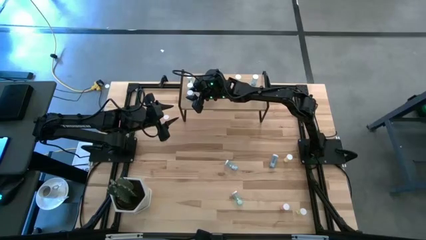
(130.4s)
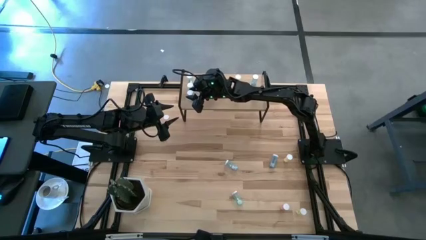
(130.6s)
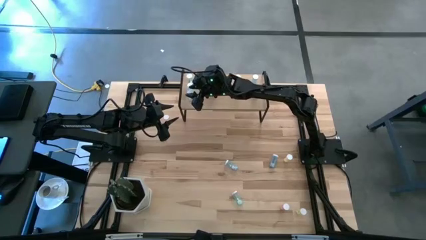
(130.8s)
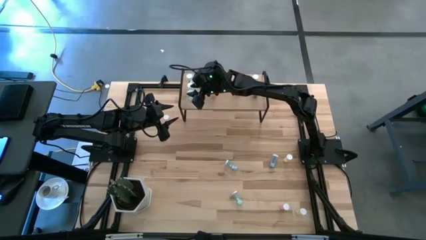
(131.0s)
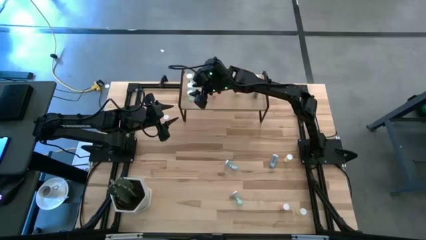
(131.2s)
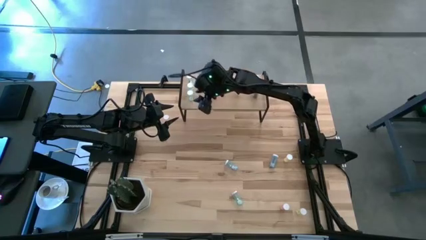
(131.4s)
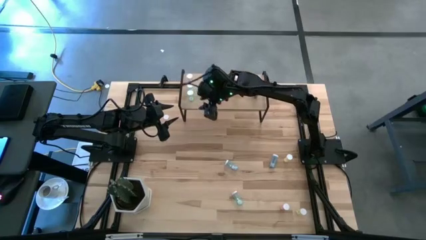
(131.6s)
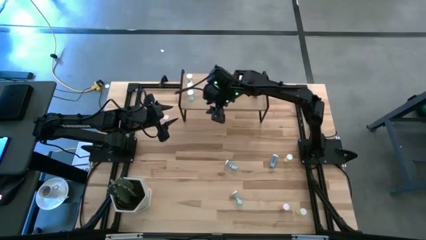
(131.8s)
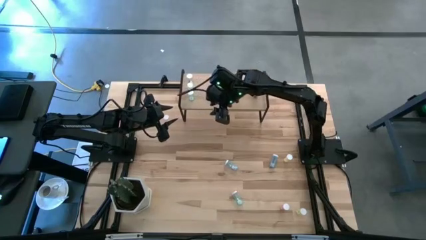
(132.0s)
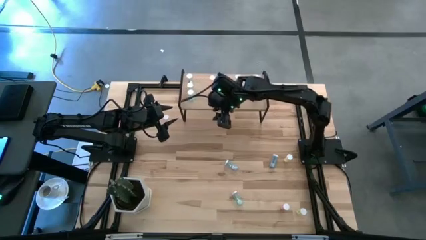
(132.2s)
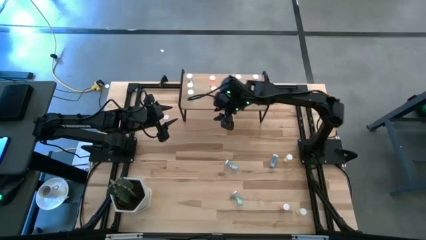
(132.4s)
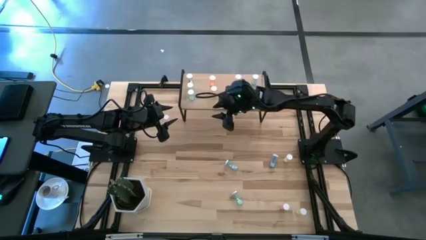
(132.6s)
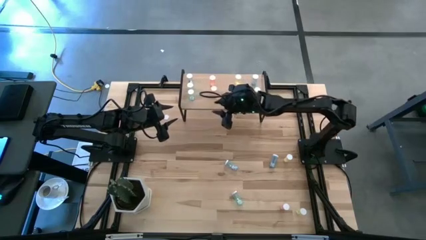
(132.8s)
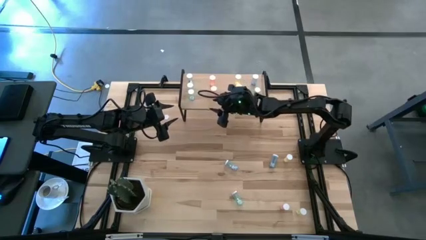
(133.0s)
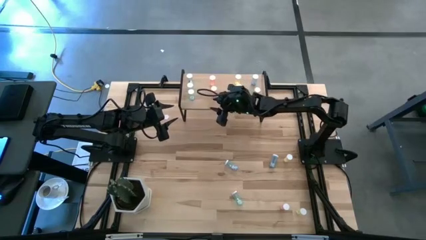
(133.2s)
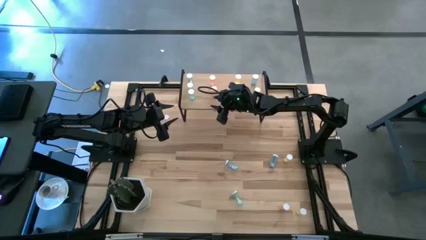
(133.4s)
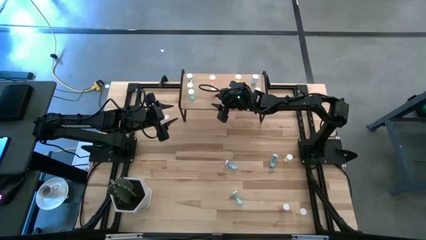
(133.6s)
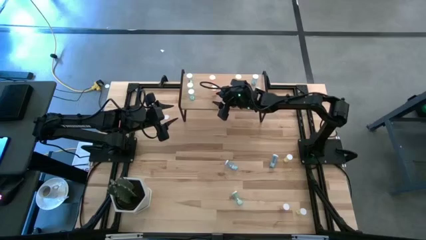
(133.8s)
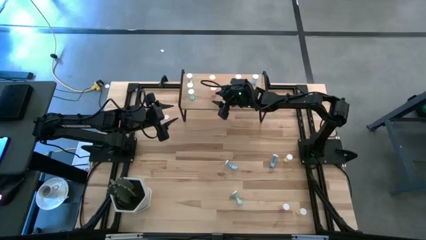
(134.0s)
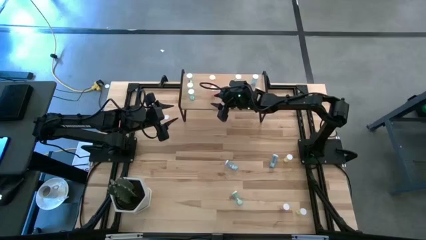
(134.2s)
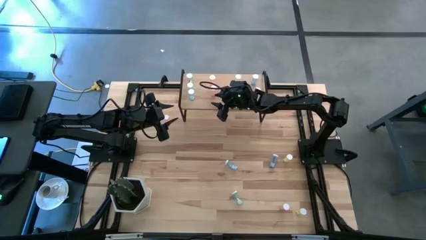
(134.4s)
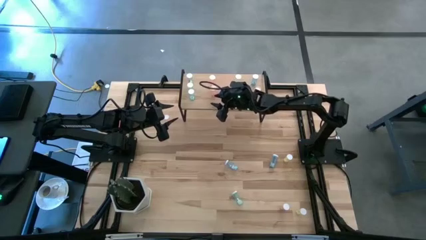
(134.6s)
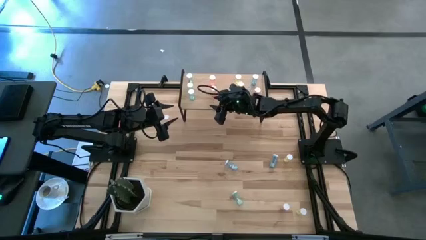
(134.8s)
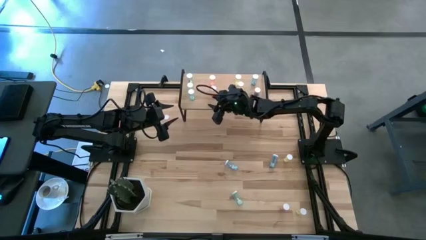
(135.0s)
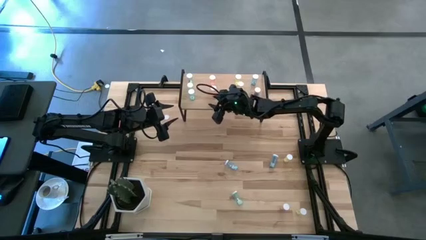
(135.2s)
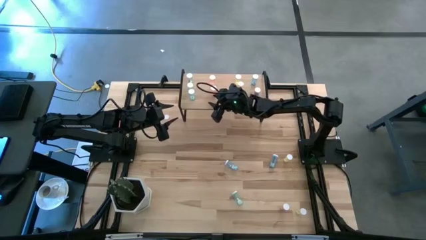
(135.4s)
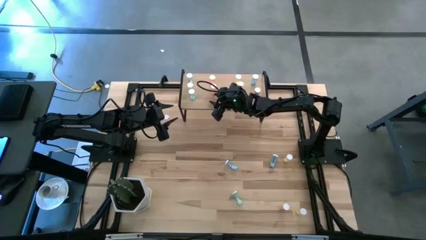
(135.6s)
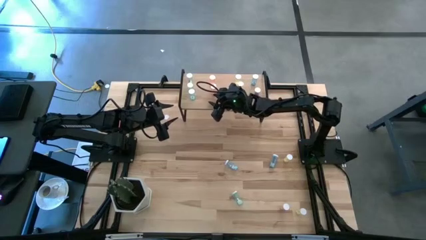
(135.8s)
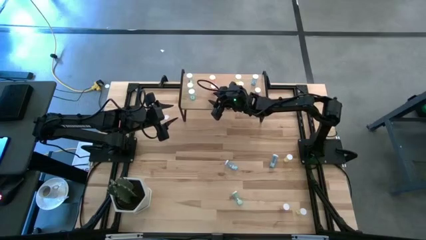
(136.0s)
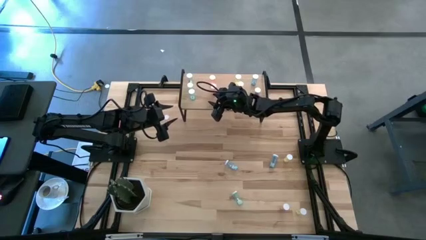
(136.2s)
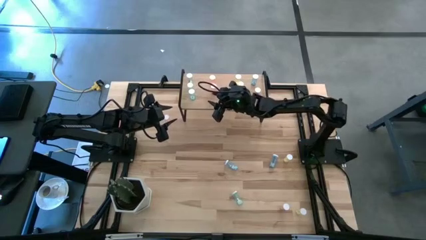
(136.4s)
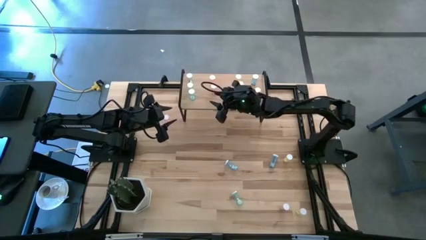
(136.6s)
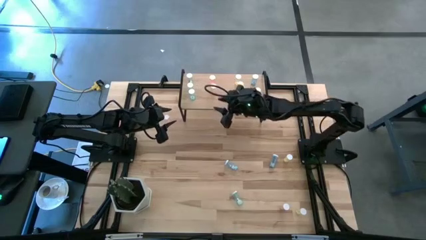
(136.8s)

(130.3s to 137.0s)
Task: Pick and place medicine bottles onto shelf by color
Adjust the pink pill bottle on the shelf

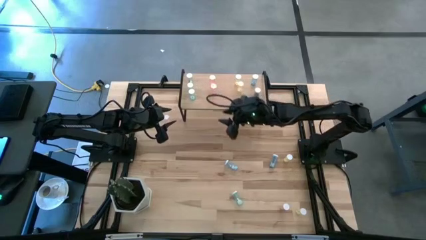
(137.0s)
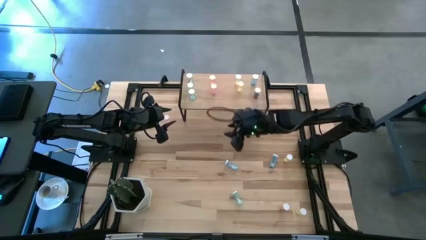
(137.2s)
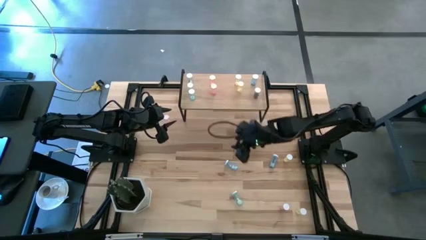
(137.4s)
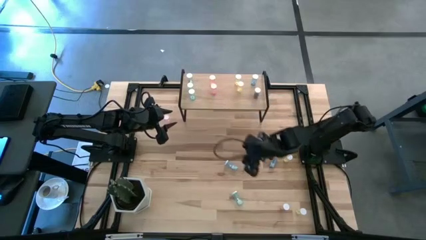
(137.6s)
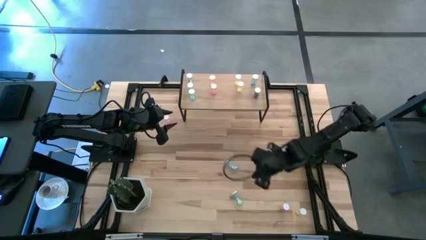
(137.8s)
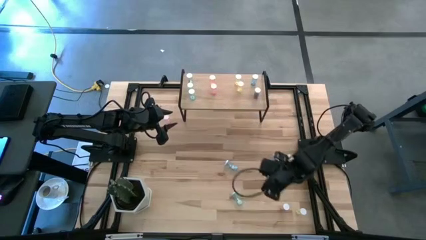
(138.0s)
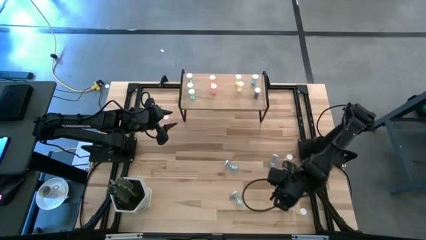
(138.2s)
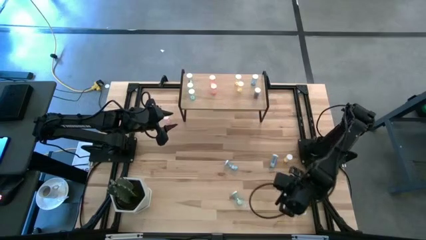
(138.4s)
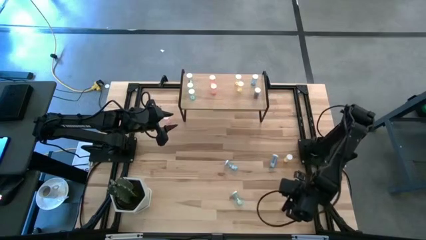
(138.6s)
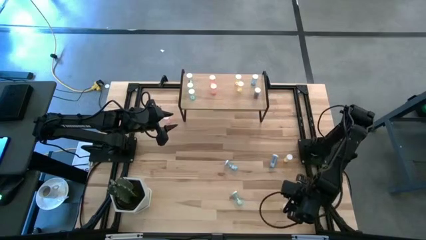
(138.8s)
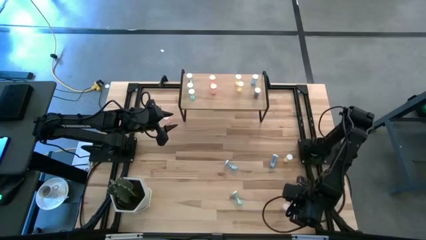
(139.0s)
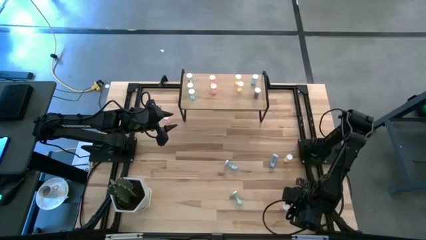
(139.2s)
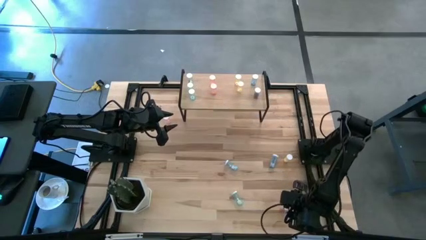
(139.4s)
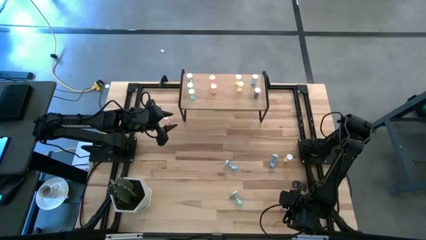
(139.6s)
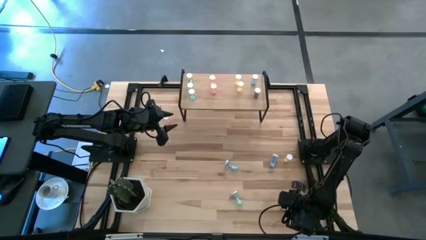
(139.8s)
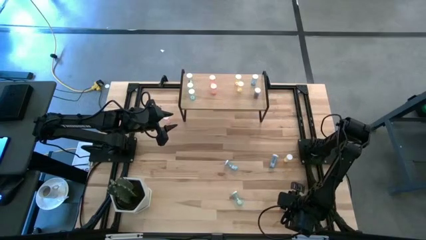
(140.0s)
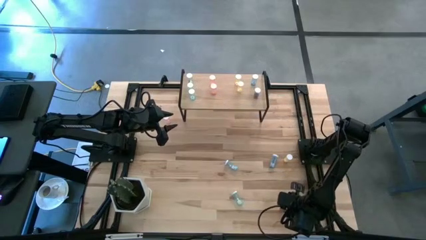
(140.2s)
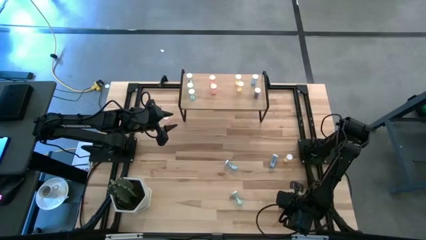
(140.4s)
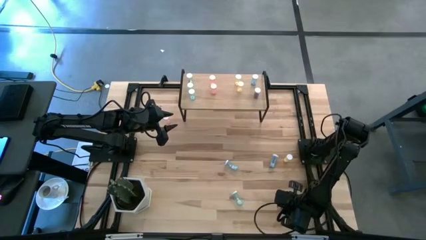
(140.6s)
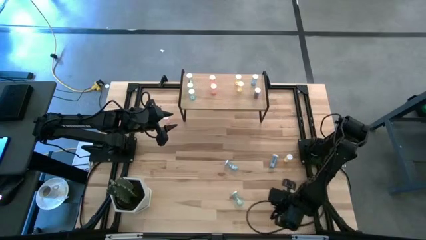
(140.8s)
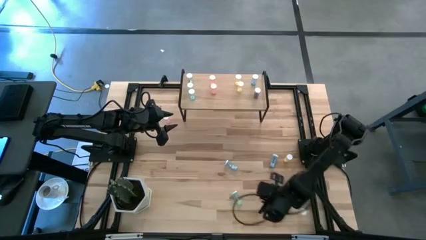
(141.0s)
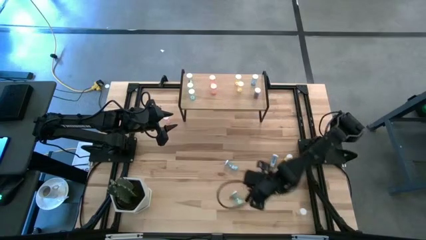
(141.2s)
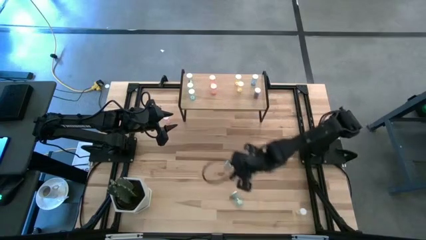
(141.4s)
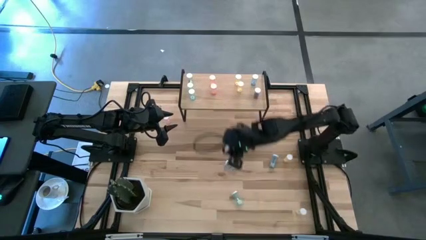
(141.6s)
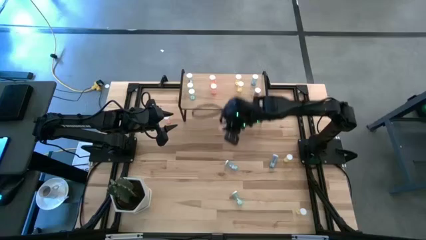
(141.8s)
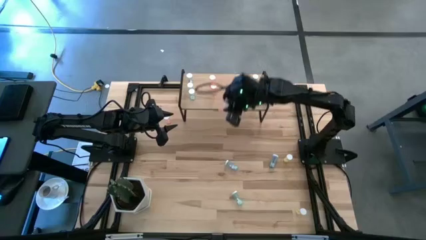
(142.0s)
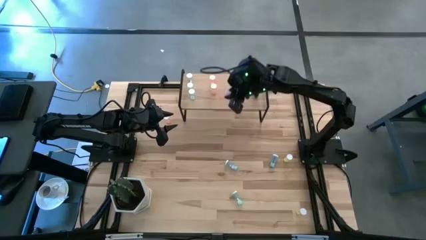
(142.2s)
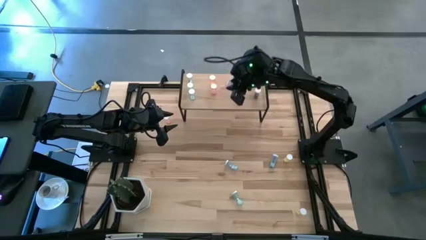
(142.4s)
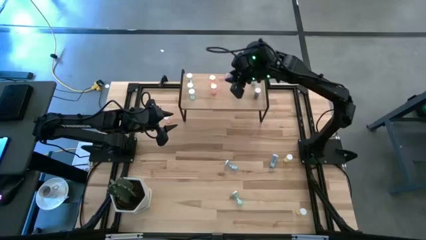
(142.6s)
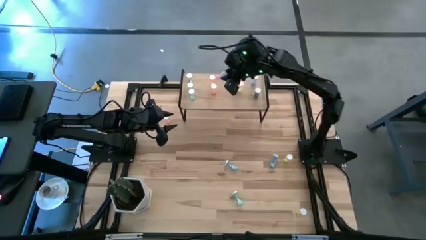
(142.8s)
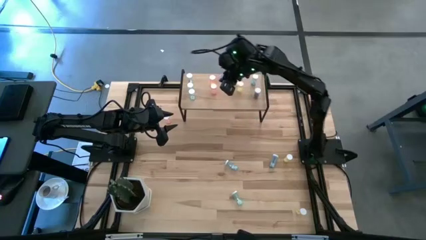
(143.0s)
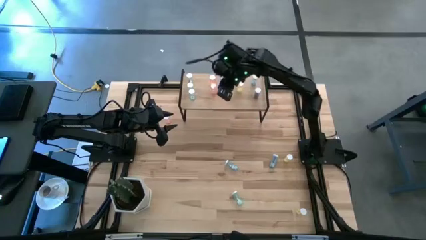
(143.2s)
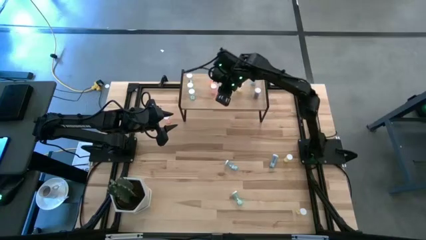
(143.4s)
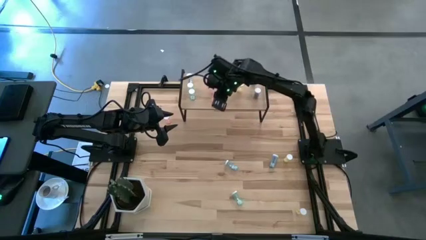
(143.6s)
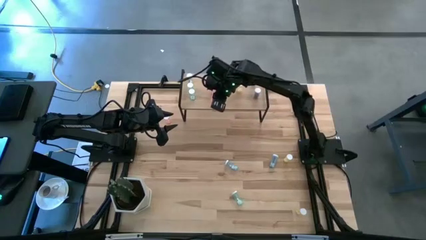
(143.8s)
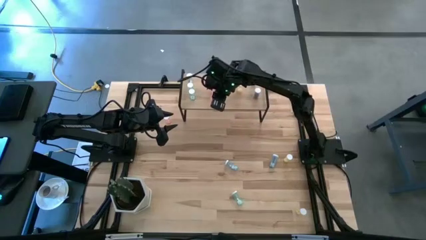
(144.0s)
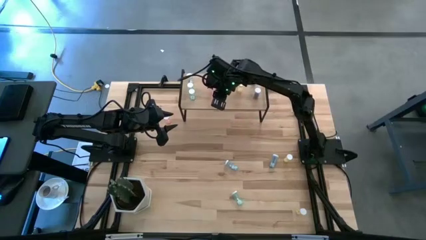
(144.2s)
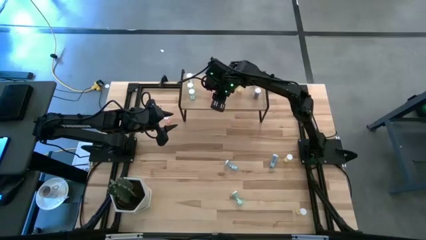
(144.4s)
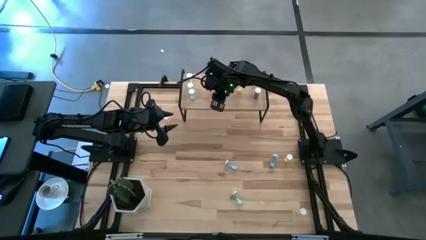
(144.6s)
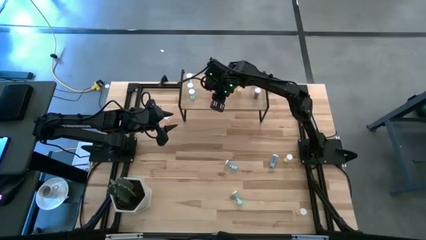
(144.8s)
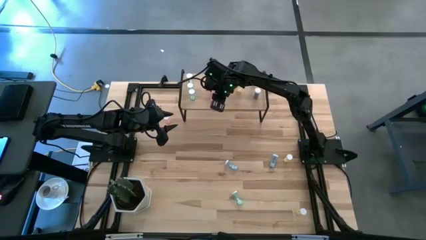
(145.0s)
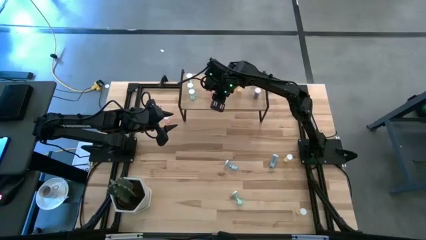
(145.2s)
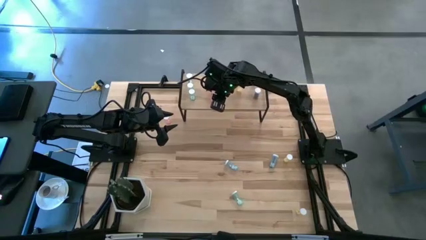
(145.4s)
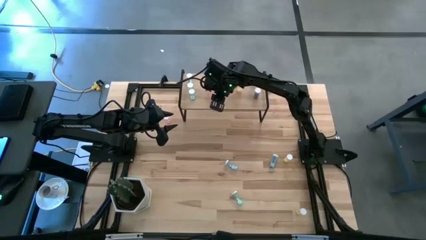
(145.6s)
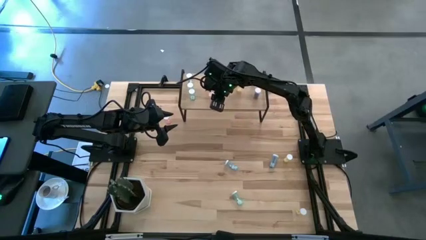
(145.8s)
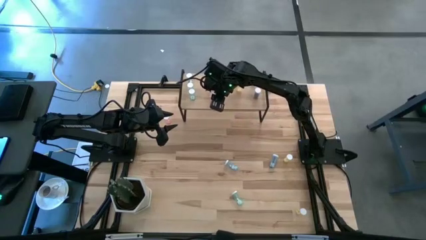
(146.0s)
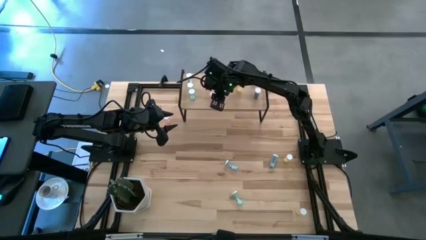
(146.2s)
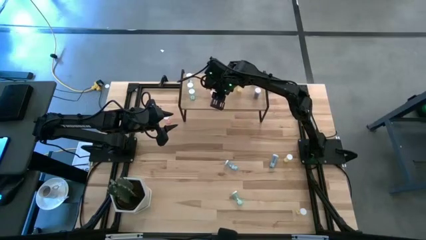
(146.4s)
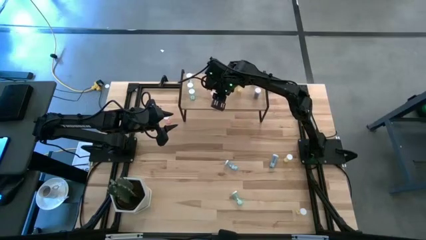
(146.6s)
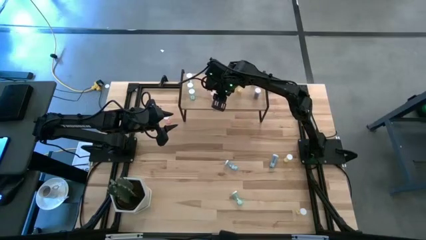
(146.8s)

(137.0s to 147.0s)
Align the pink pill bottle with the pink pill bottle
